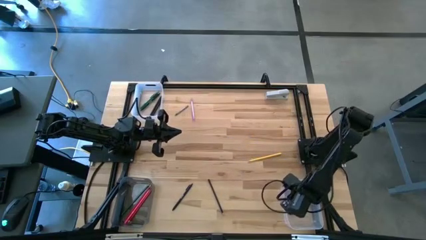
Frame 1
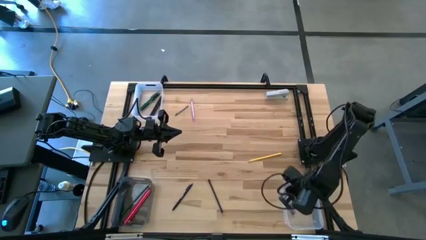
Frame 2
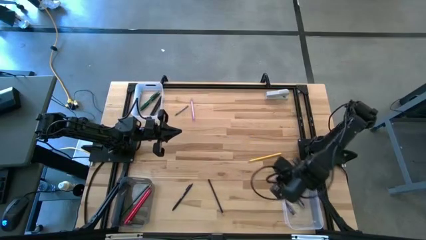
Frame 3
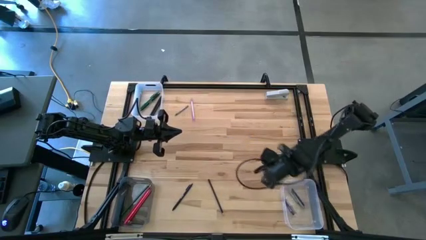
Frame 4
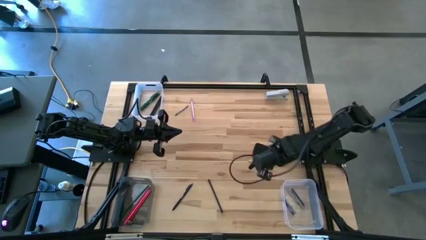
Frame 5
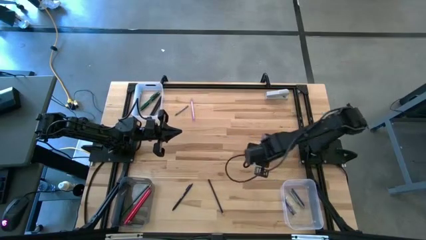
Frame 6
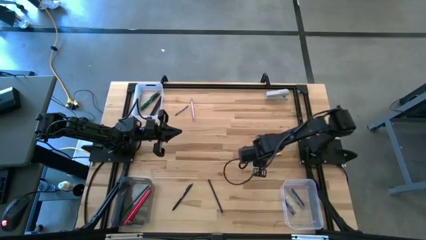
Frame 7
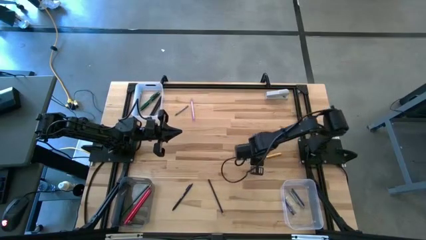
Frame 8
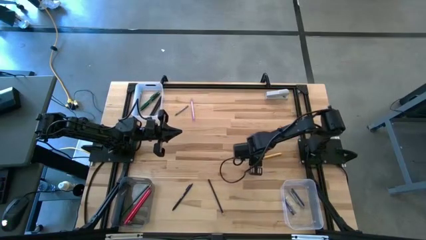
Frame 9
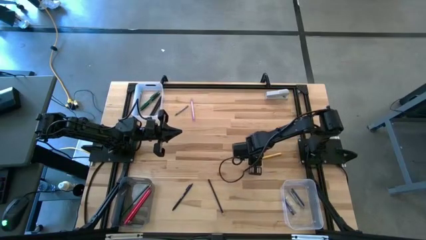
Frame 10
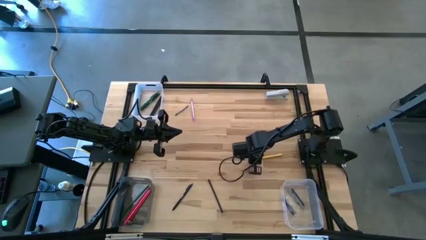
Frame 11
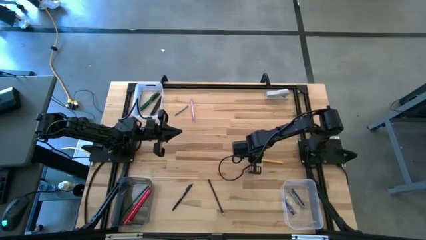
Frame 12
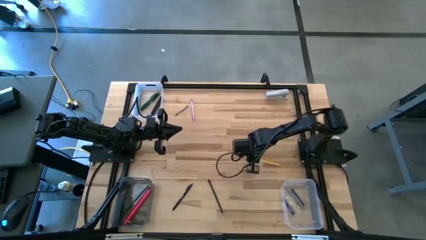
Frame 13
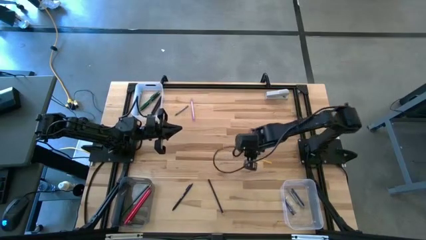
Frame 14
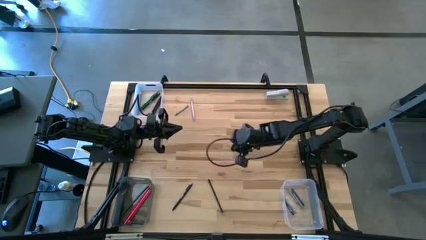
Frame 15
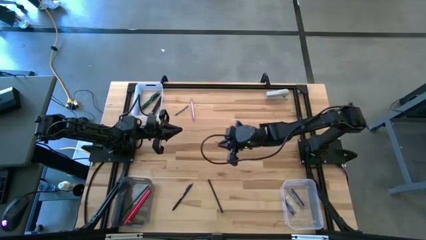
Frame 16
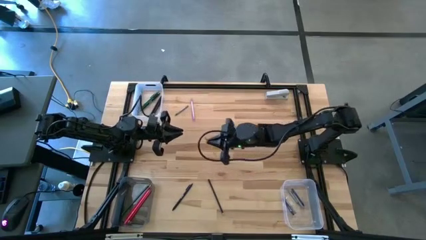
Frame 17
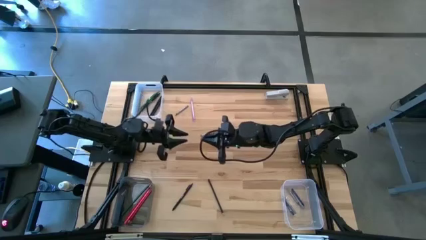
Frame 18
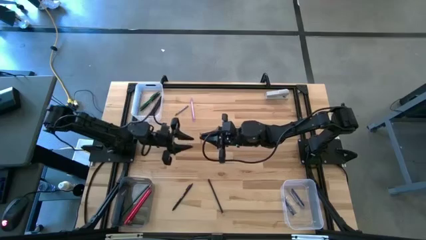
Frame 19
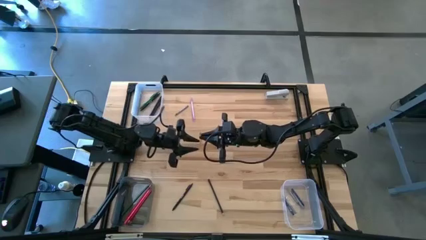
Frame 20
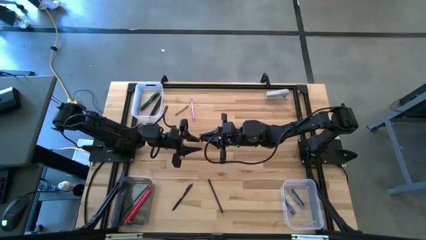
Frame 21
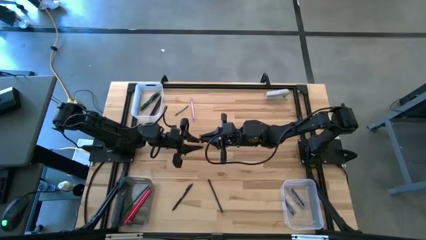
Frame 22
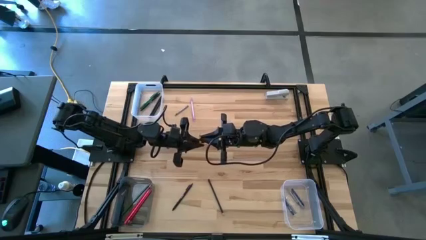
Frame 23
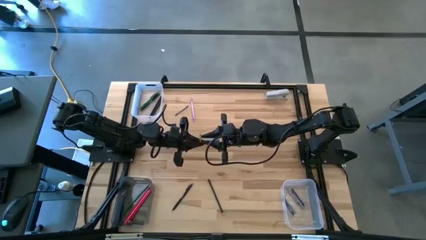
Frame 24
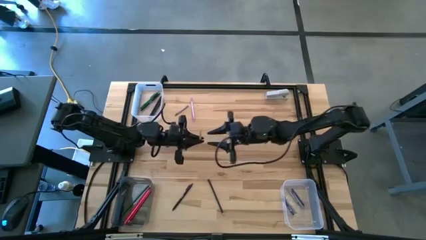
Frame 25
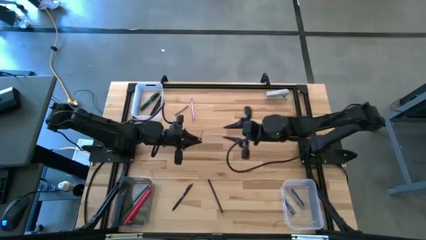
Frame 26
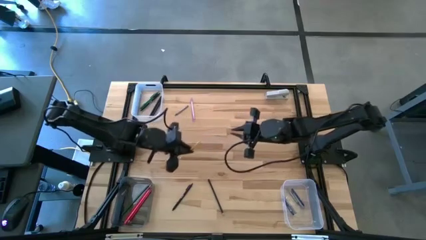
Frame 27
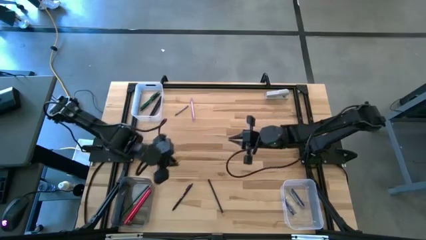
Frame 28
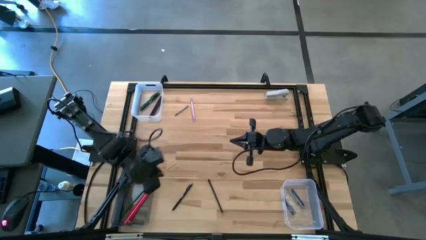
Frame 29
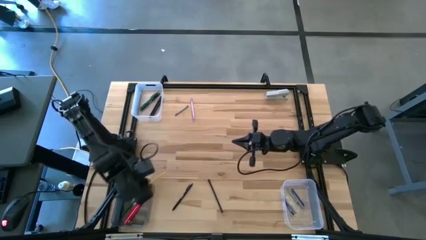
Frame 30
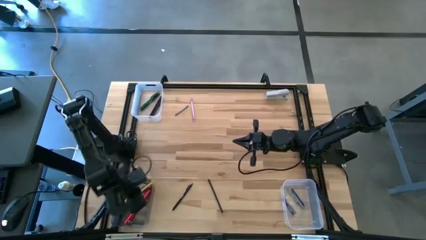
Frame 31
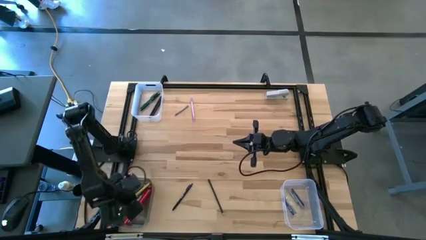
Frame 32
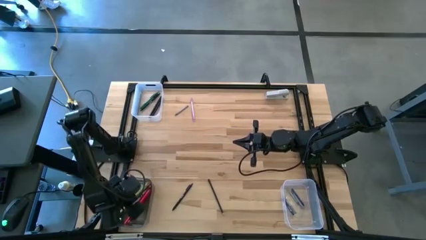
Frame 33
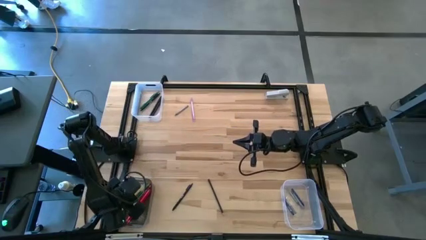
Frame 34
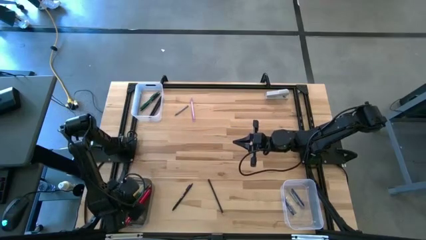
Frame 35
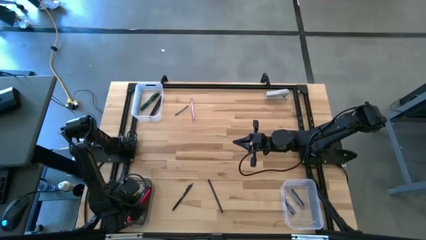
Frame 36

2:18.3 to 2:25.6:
Task: Sort crayons/erasers/pens/pencils in bins
Put the yellow pencil into the black bin

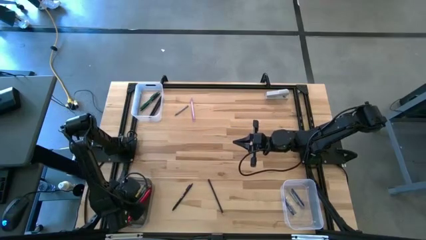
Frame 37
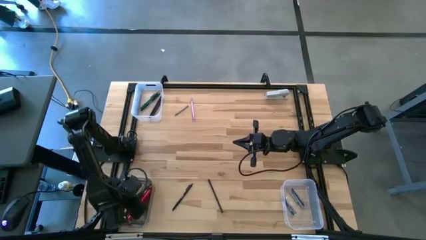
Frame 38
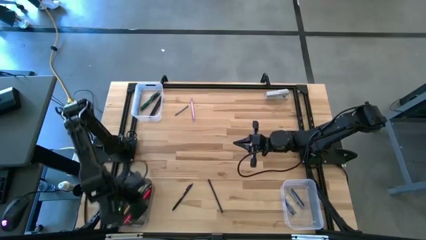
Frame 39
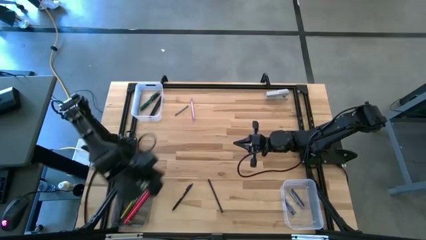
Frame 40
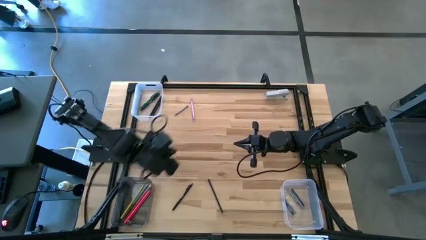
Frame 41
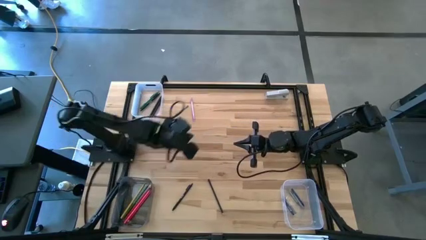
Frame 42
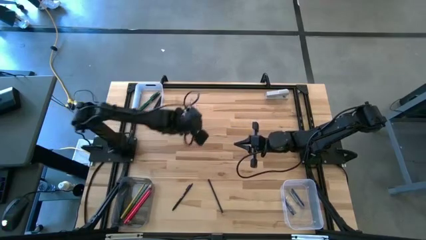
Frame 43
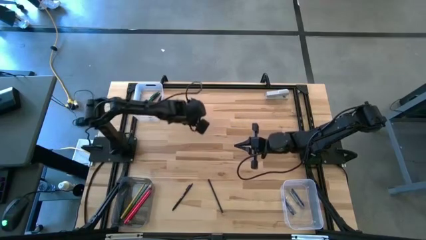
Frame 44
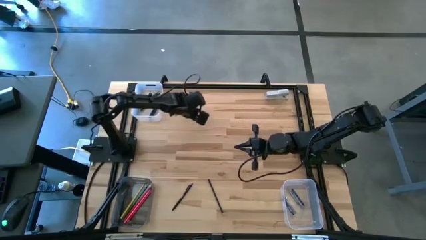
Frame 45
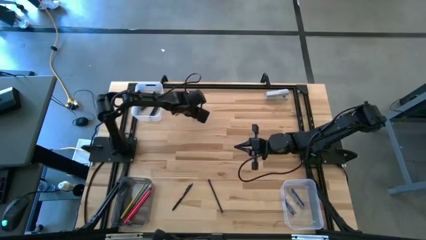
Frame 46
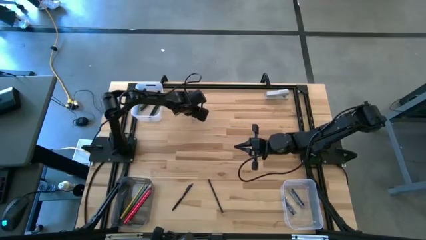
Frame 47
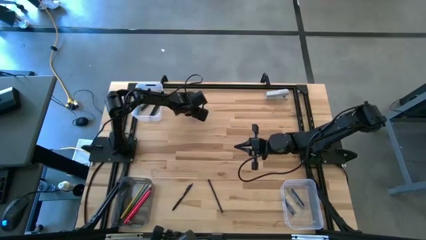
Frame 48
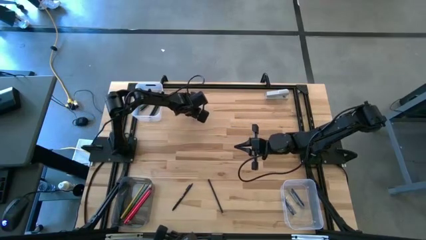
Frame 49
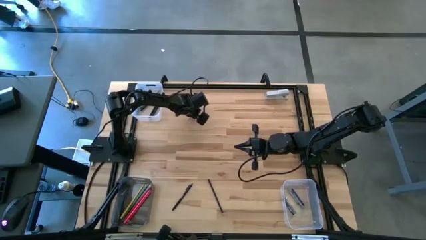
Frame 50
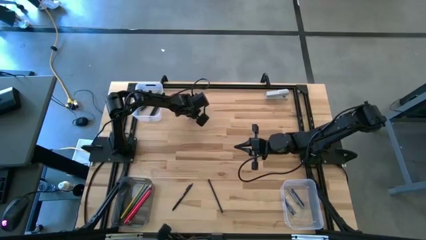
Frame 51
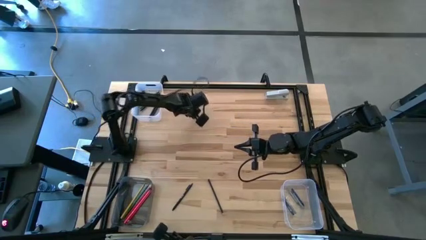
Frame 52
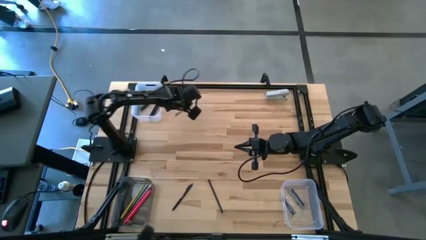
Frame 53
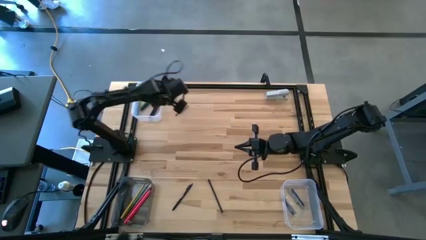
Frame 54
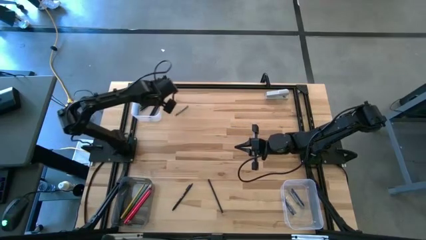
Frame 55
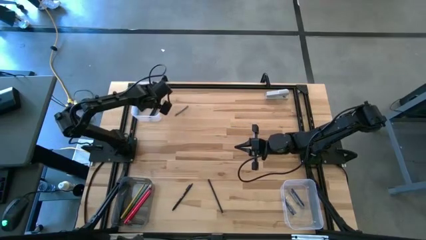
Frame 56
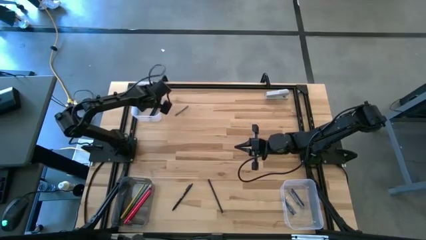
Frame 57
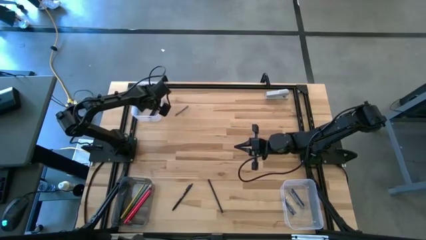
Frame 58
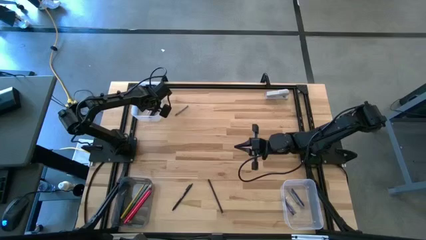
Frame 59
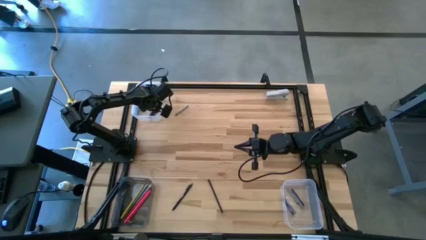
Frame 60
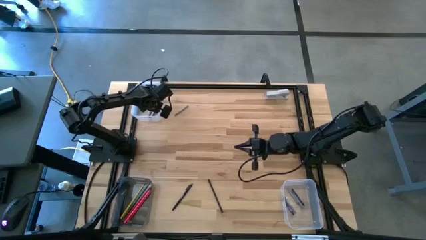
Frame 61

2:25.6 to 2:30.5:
Put the violet pen into the top transparent bin

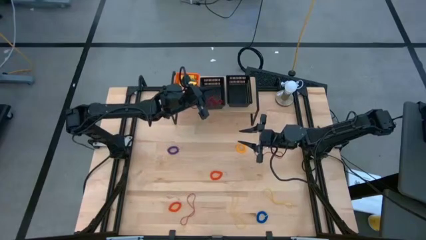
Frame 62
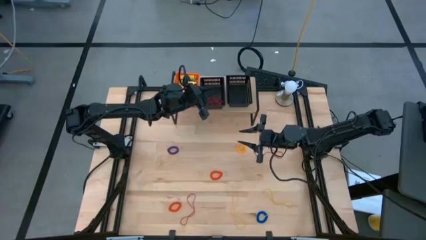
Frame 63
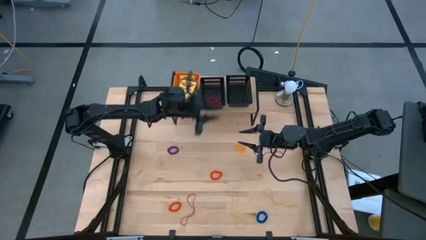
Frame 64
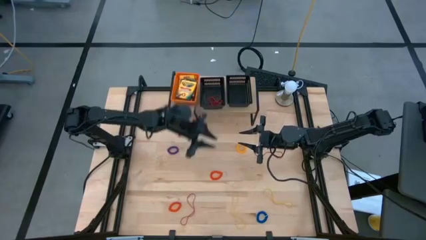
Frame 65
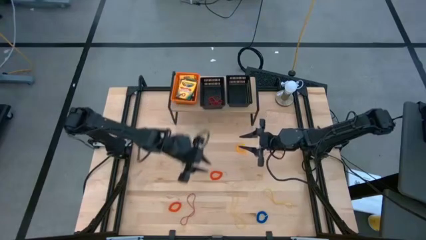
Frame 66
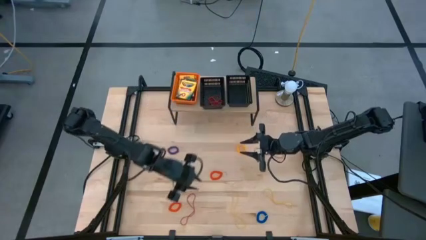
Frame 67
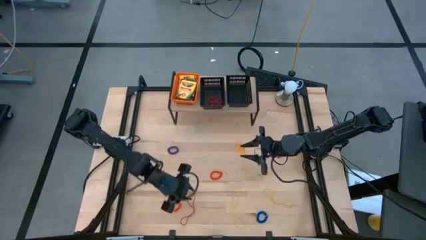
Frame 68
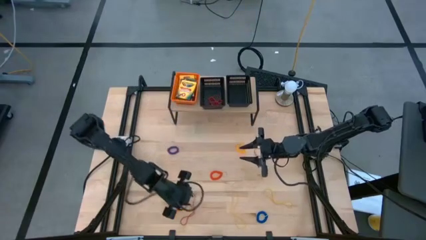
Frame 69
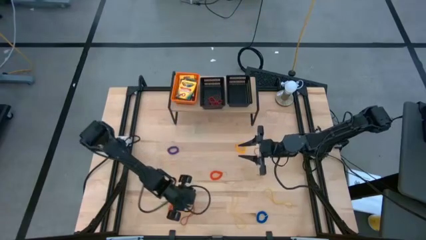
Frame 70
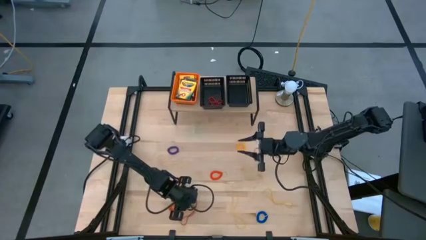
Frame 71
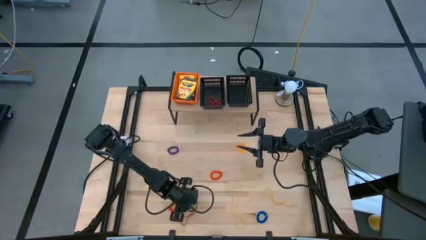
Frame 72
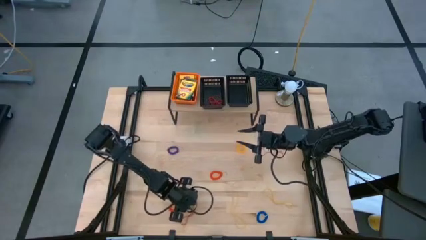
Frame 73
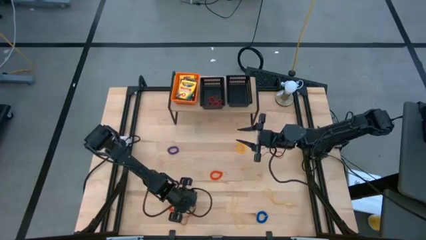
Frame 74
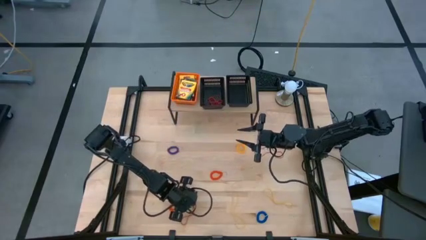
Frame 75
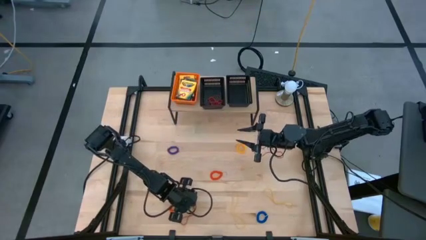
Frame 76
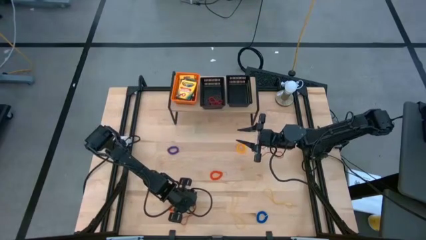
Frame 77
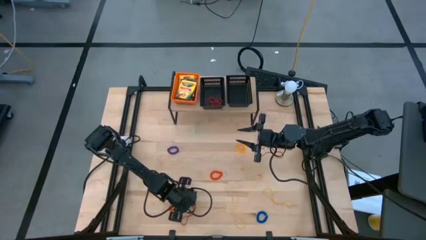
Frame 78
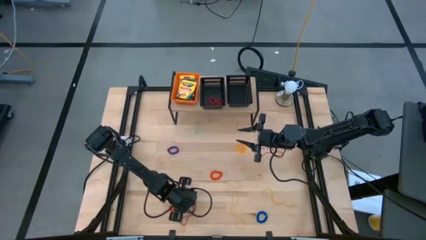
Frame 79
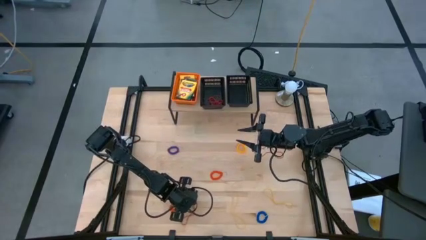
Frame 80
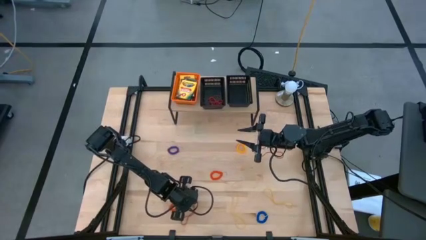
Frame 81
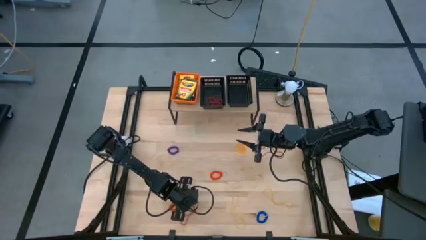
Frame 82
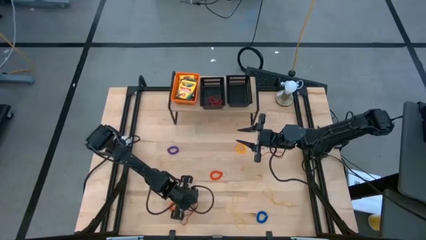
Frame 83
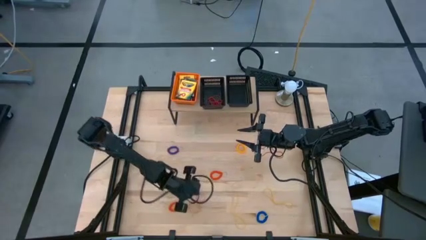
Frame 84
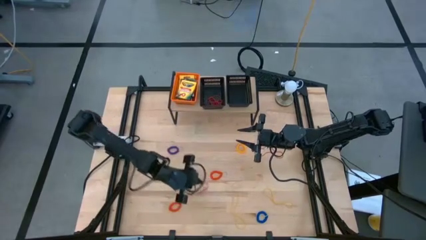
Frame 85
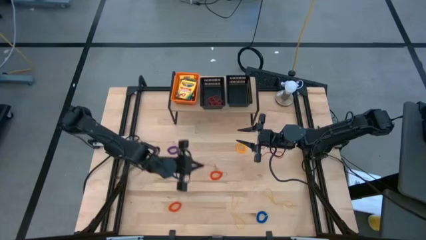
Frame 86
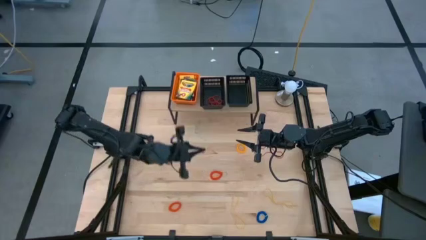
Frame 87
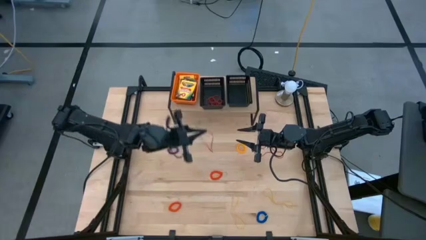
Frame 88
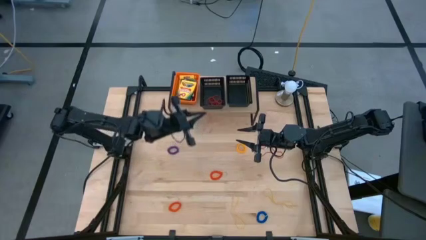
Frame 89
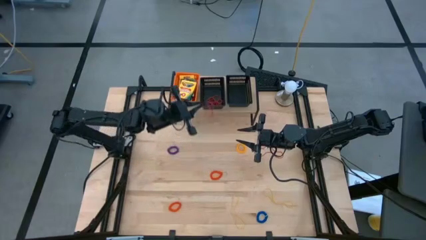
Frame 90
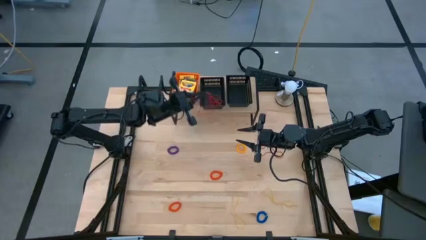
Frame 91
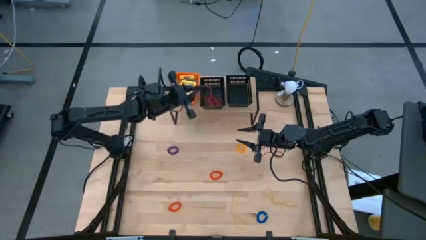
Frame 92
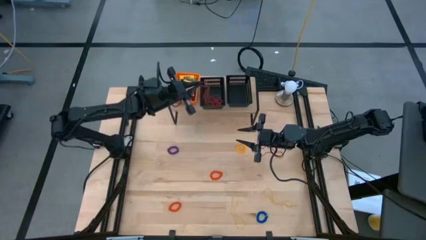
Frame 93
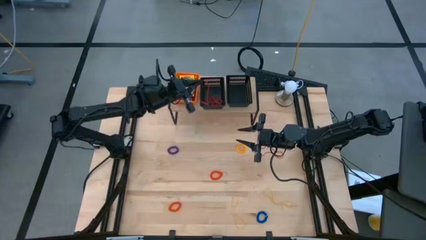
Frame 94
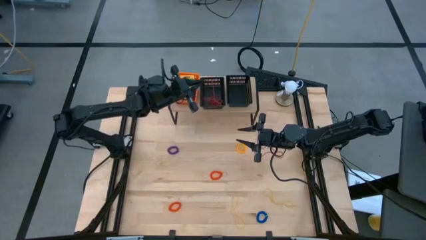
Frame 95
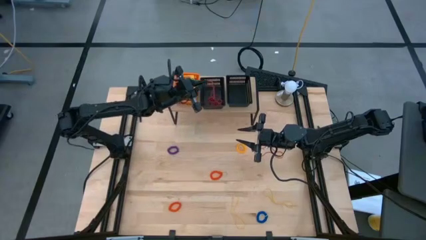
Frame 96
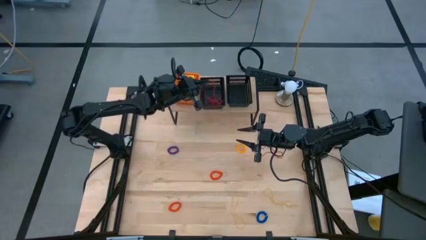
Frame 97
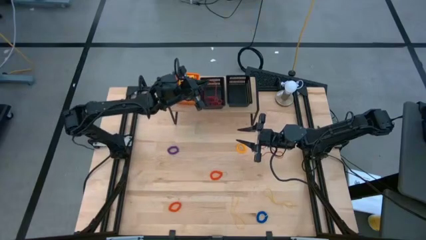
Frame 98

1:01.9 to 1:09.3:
Task: Pick & Place Office Desk Supplies
Put the red rubber band into the left black basket on the shelf
